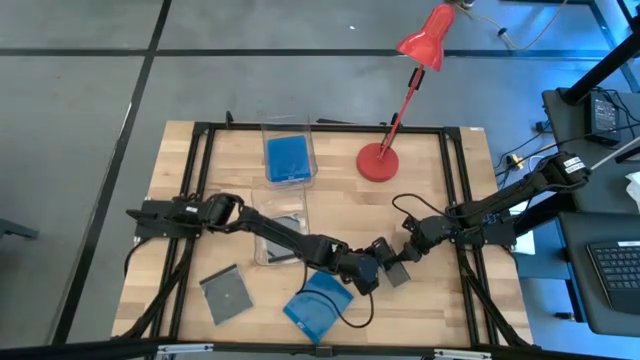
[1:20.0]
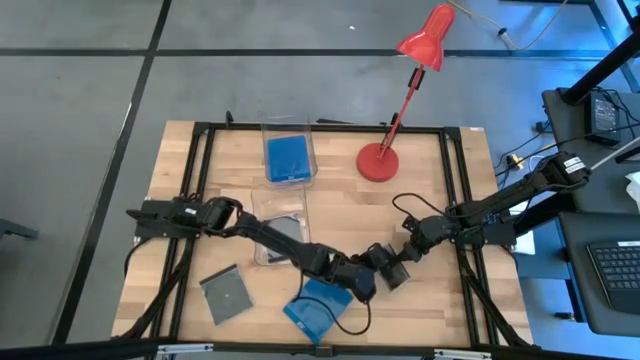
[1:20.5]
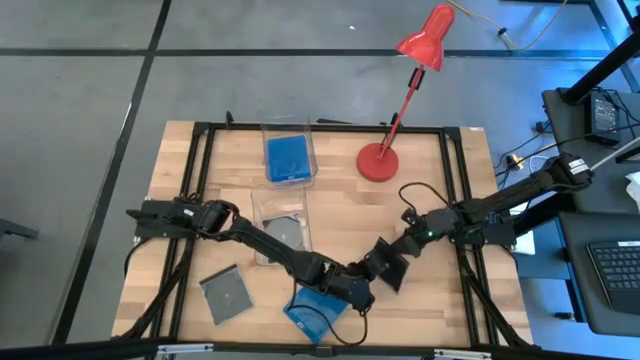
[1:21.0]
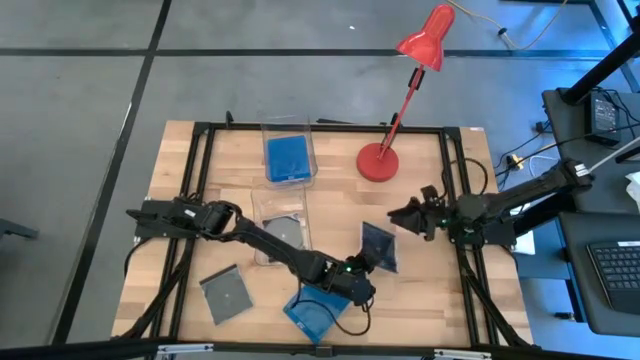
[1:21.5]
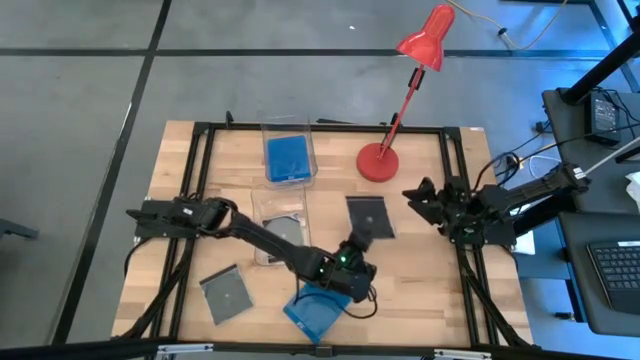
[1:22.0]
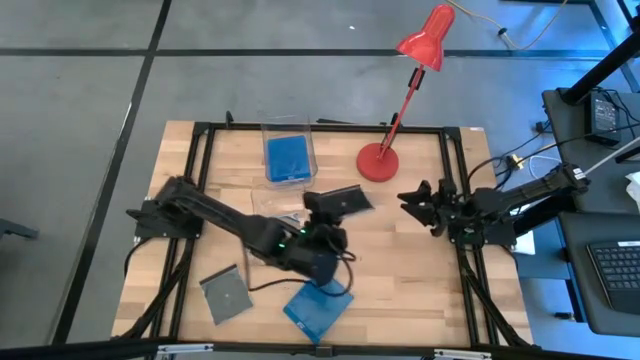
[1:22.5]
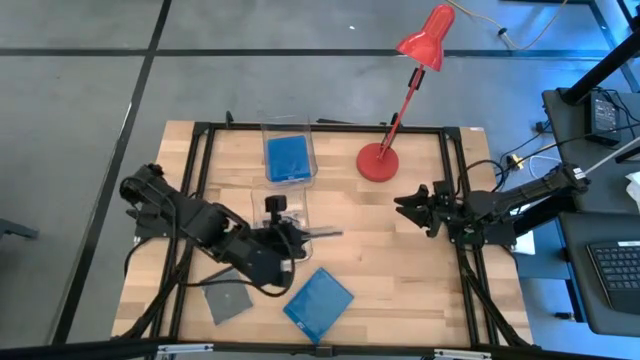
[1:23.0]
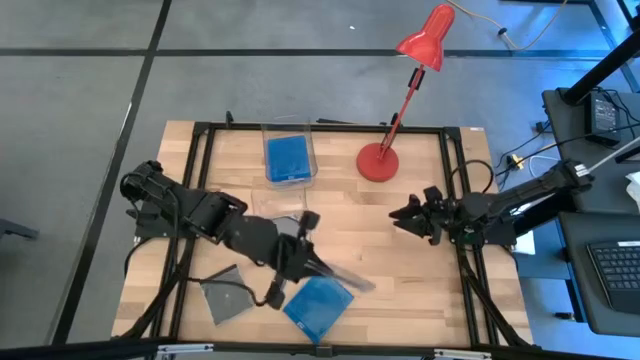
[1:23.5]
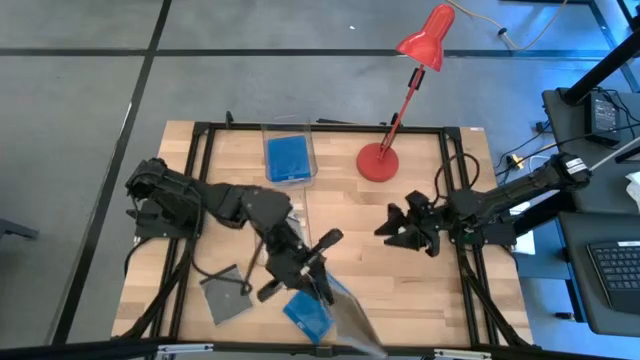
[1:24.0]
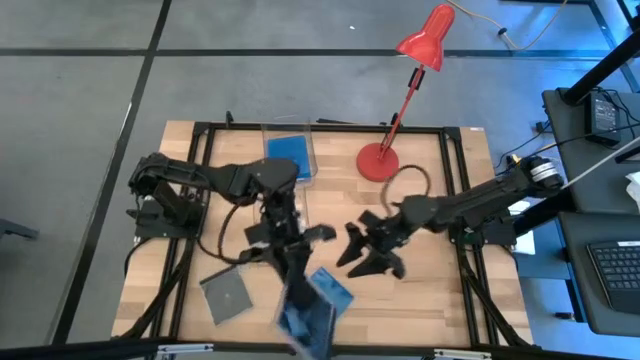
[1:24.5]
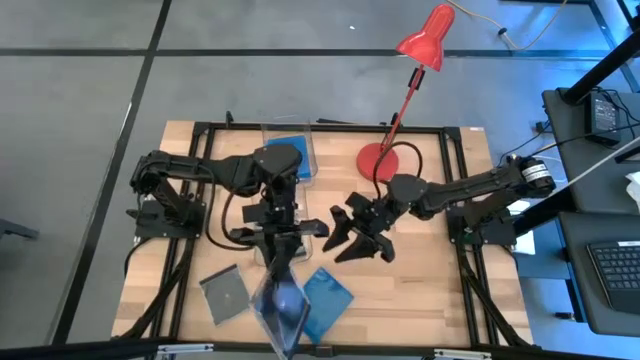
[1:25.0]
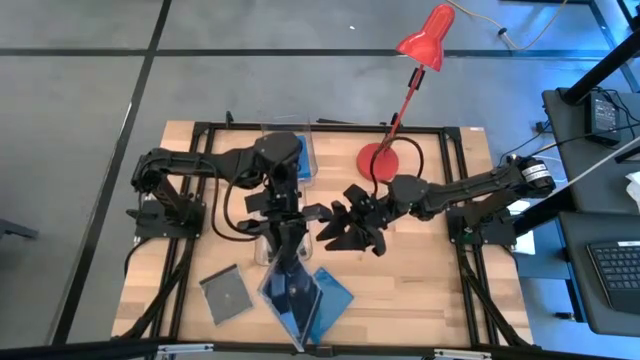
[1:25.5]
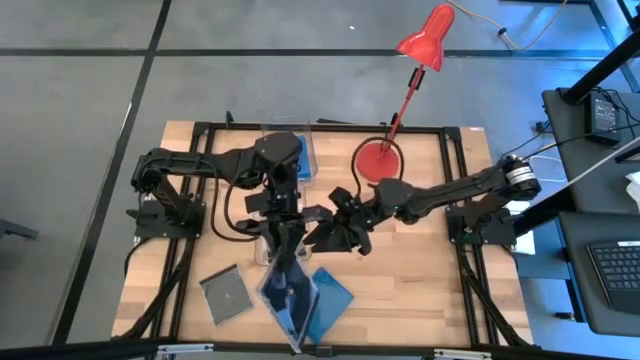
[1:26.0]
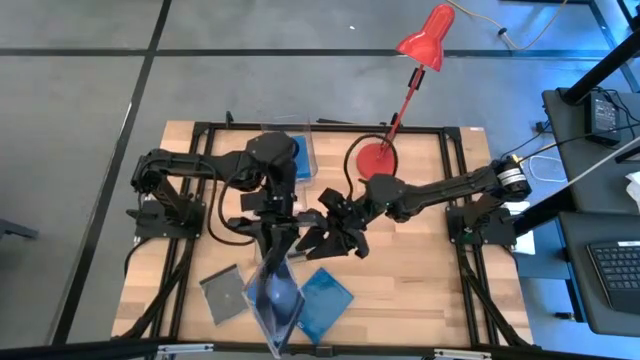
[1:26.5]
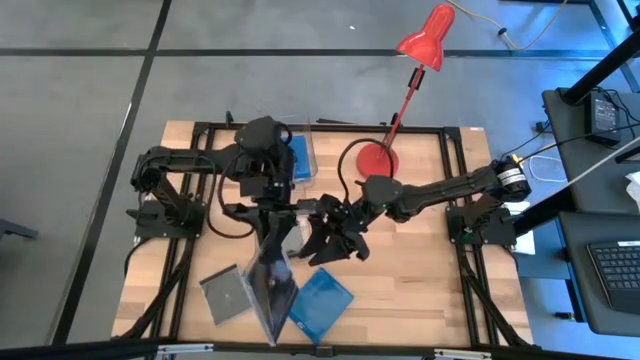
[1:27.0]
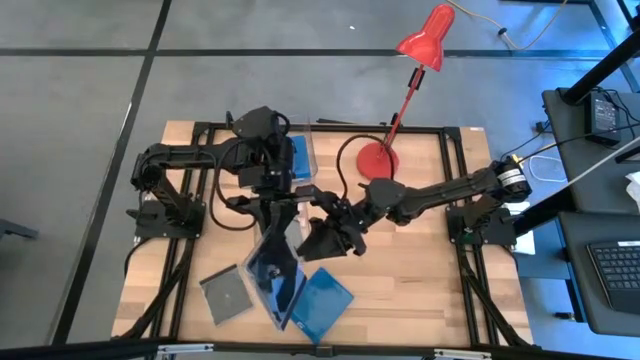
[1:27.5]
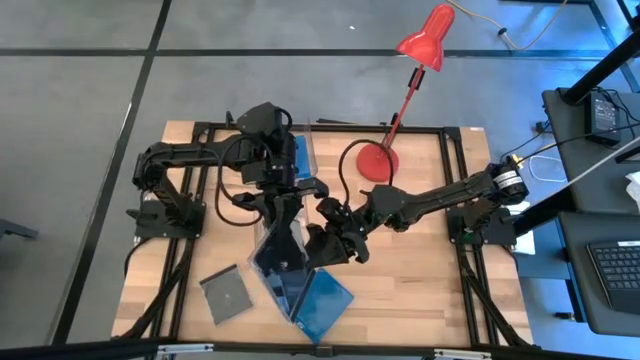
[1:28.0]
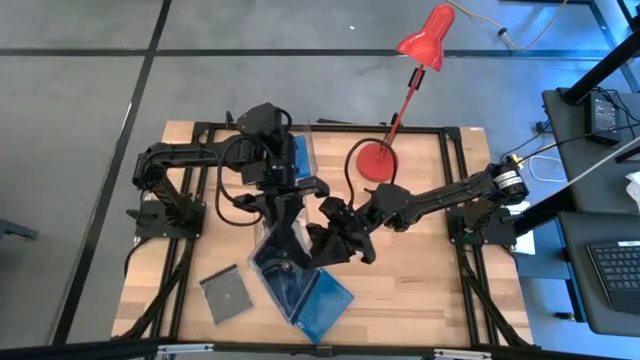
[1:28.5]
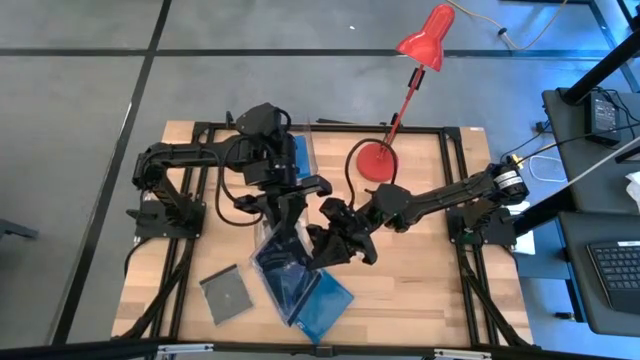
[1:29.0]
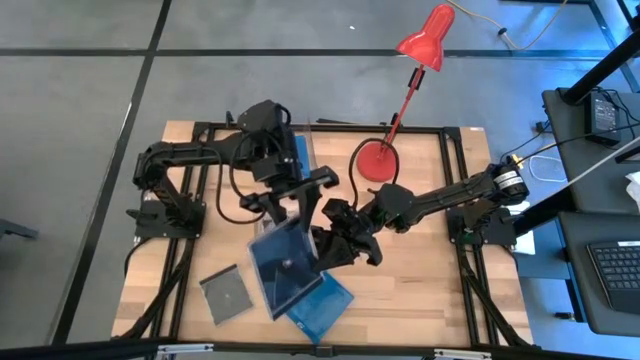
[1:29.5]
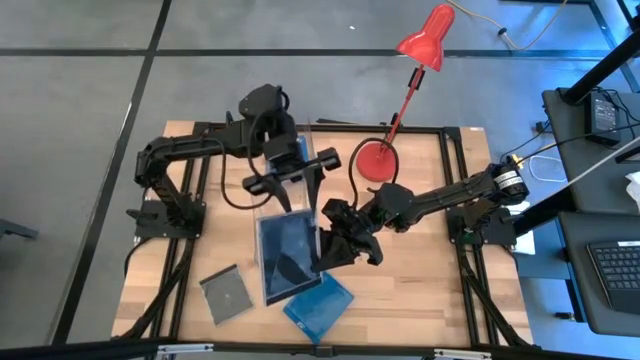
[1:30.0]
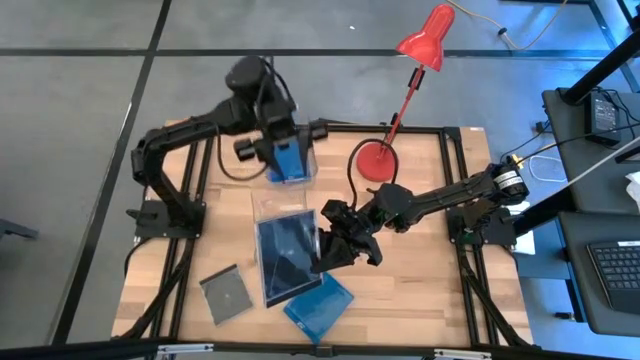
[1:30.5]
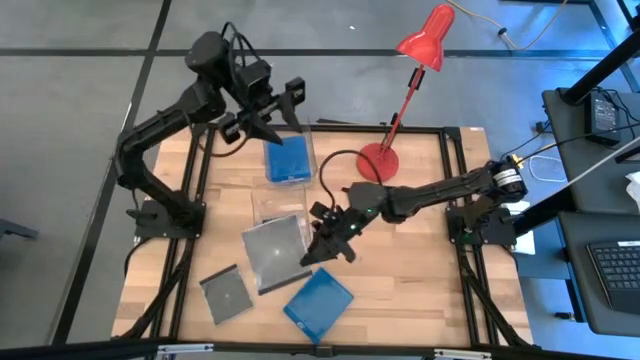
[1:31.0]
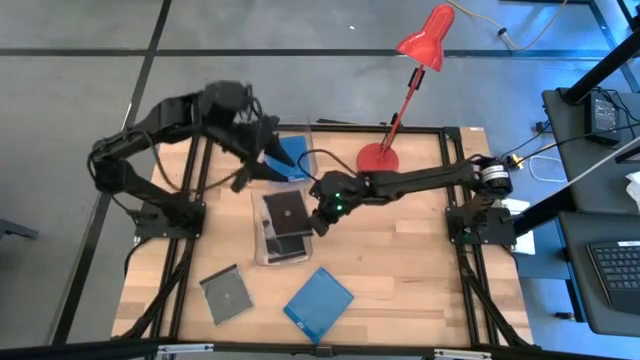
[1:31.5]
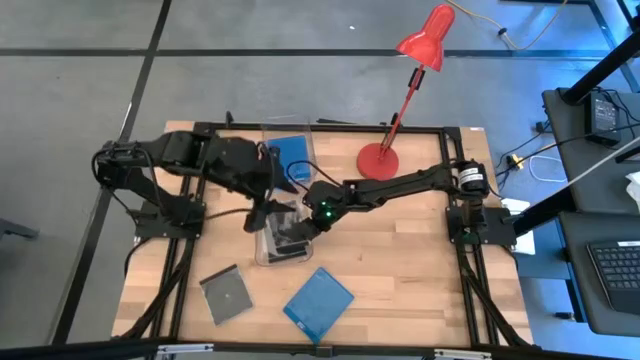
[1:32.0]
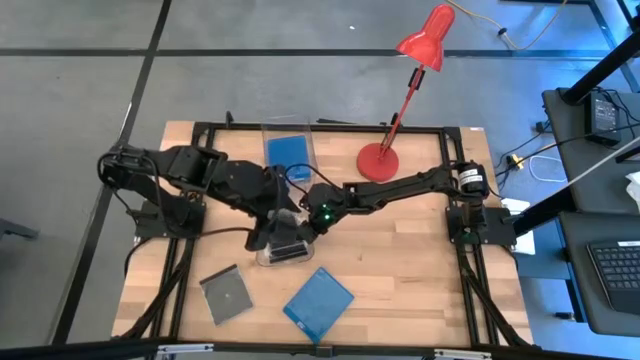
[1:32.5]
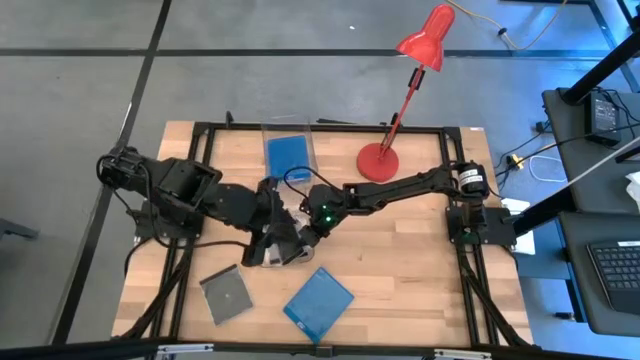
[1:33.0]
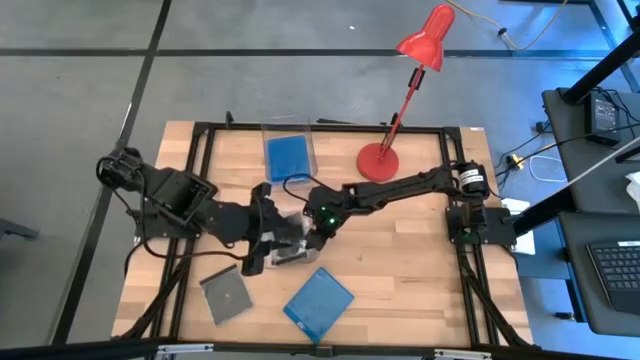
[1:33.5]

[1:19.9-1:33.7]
Task: Pick & place jewel cases by type
Put the top black cd case into the bottom transparent bin

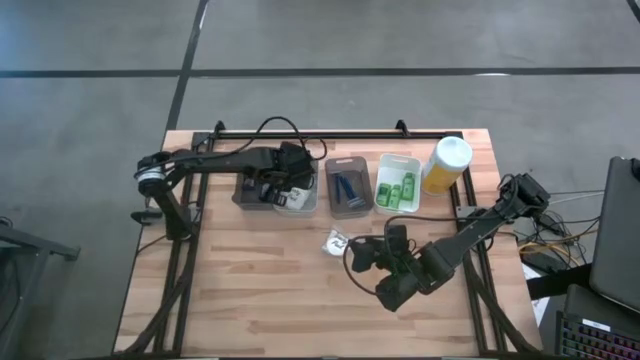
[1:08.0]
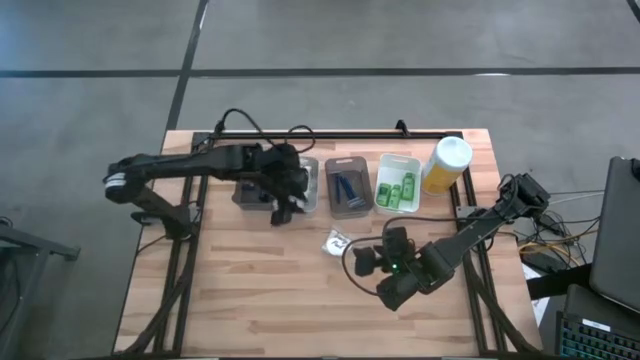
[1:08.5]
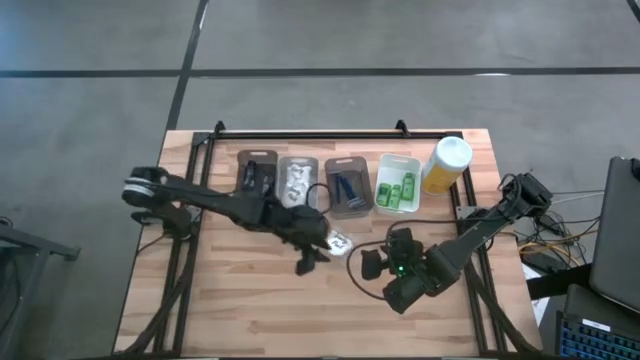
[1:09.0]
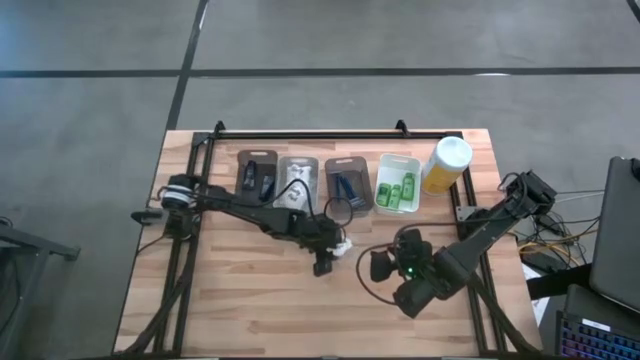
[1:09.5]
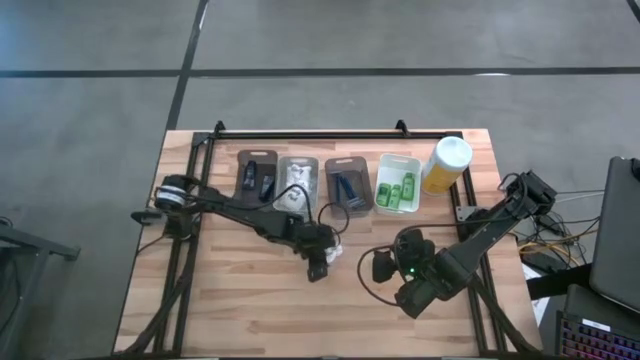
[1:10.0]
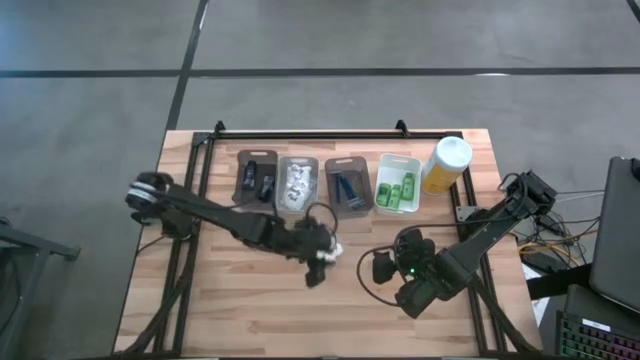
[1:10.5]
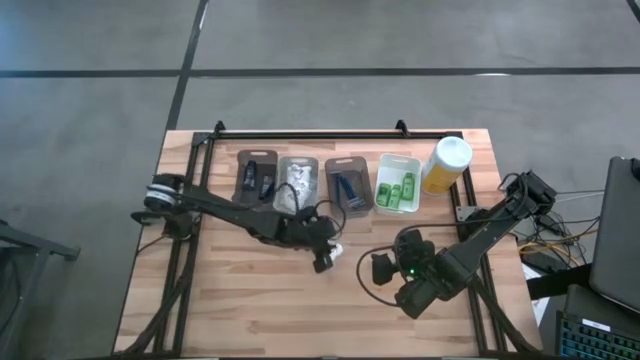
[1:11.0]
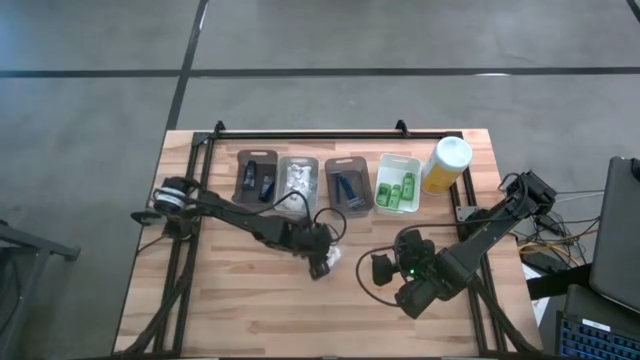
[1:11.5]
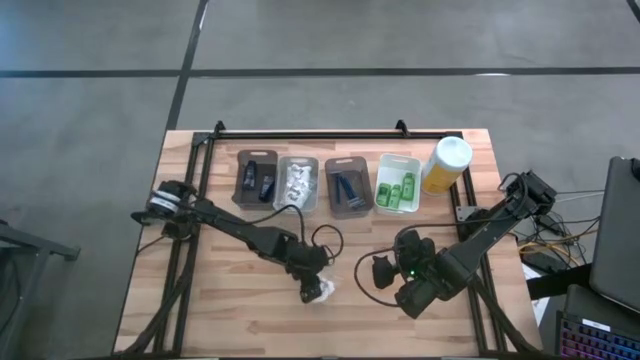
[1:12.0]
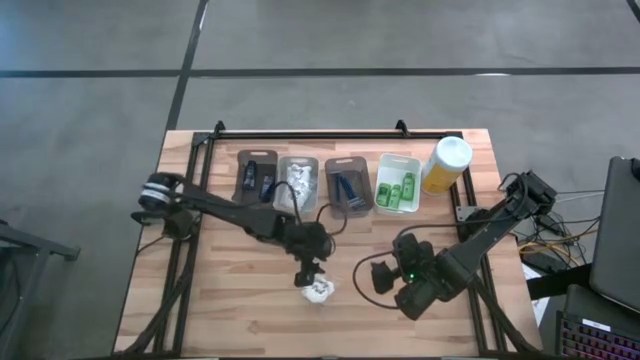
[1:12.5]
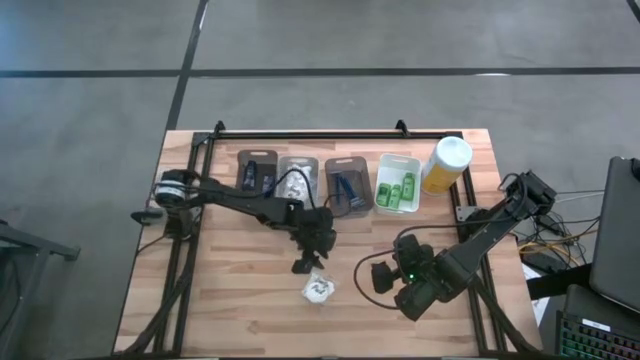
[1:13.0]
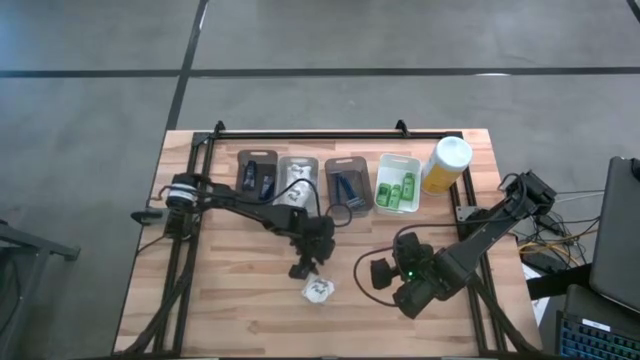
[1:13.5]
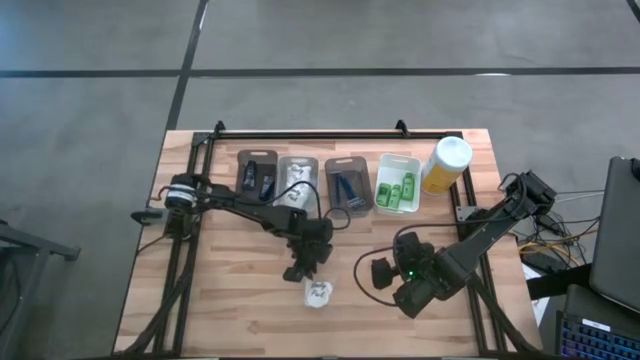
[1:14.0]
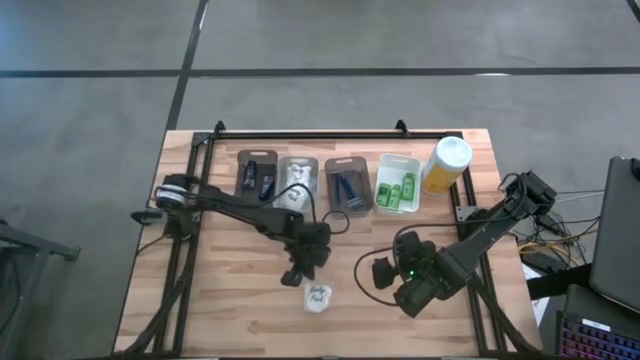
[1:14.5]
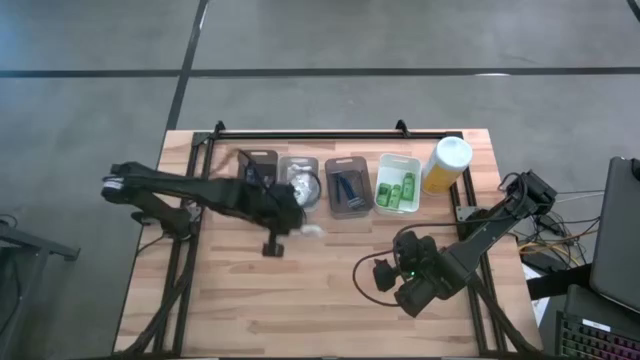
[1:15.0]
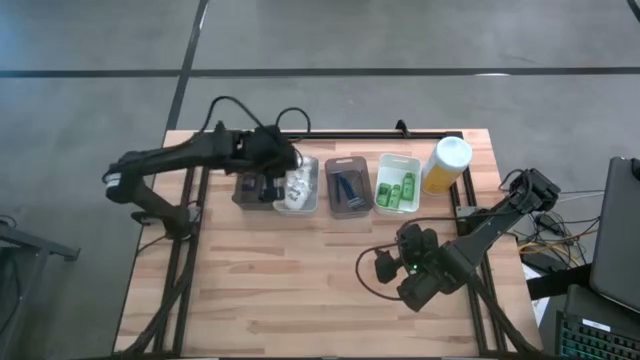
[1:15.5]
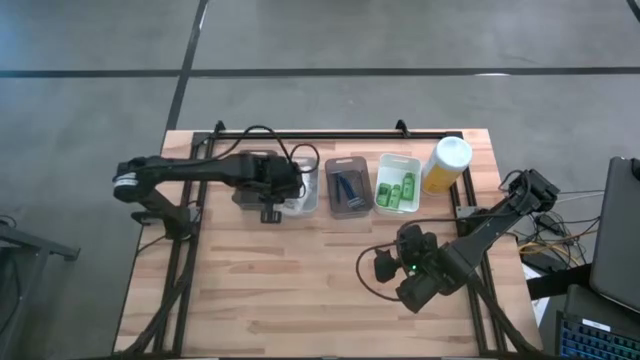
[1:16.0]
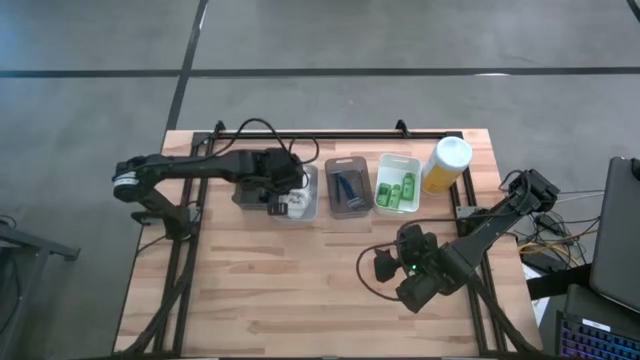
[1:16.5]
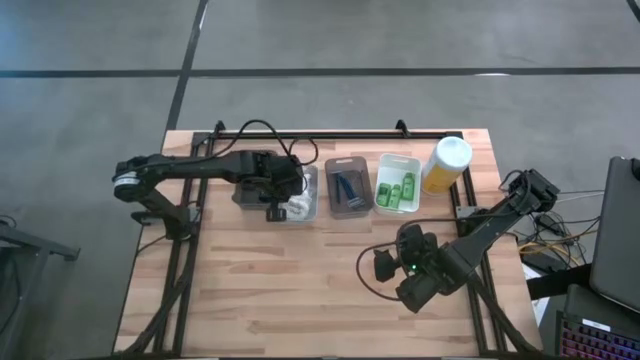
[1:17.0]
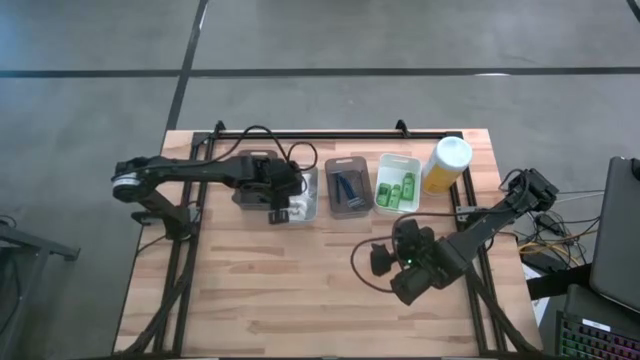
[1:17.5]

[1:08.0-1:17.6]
Task: Pick & Place Travel size toiletries
Put the white cotton pack into the gray bin
